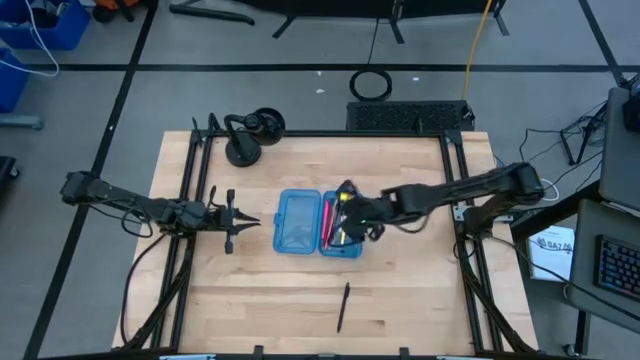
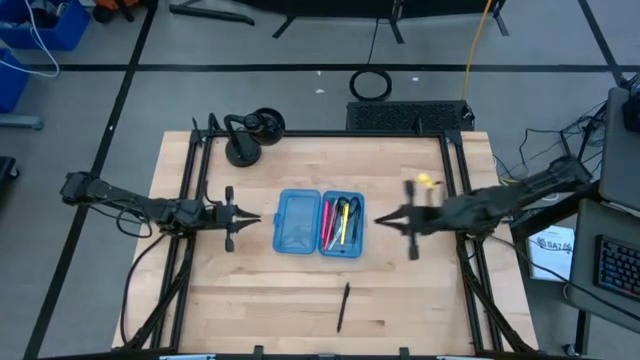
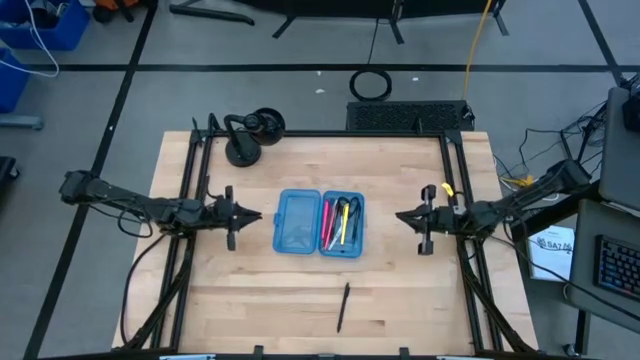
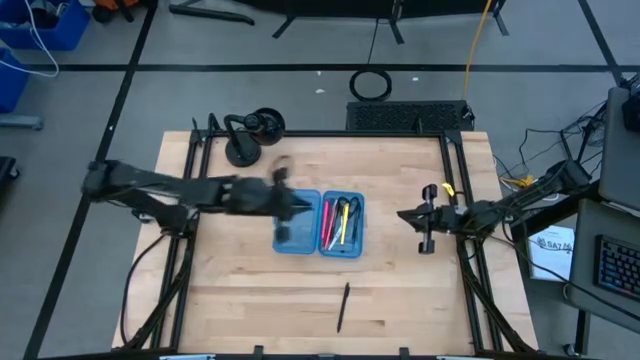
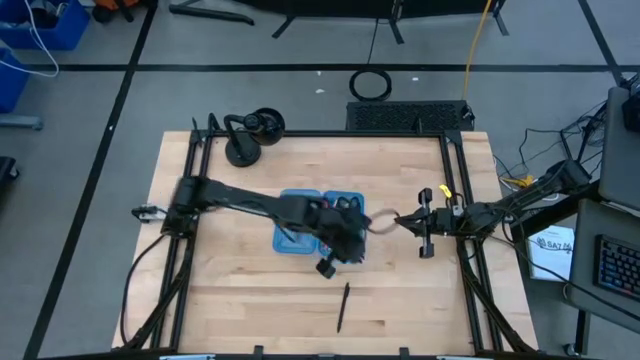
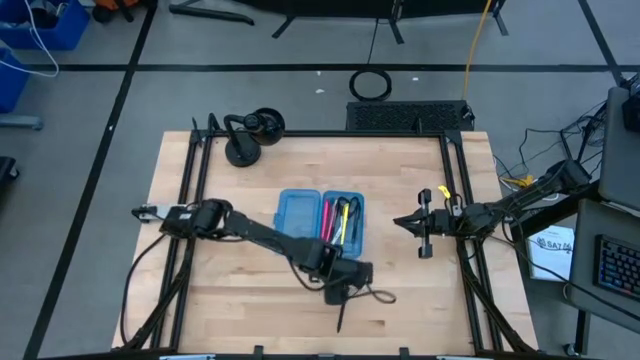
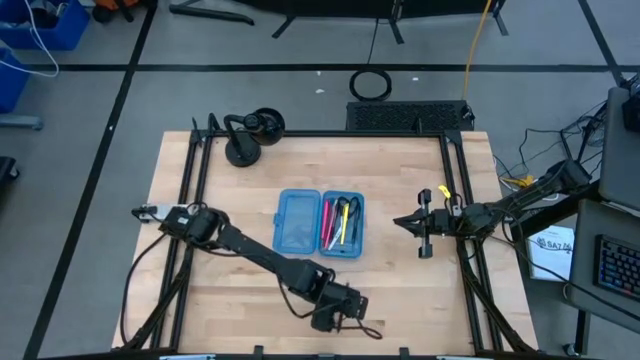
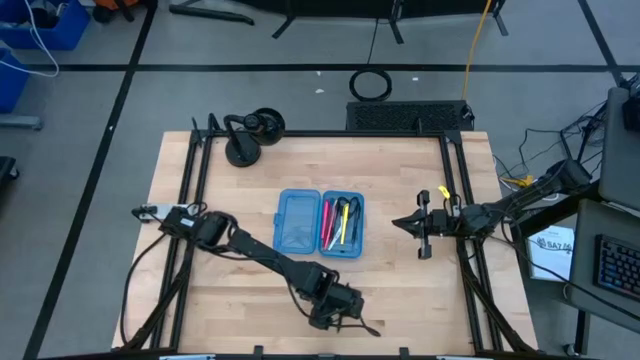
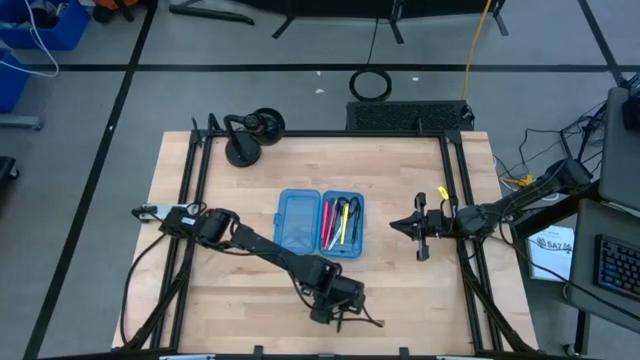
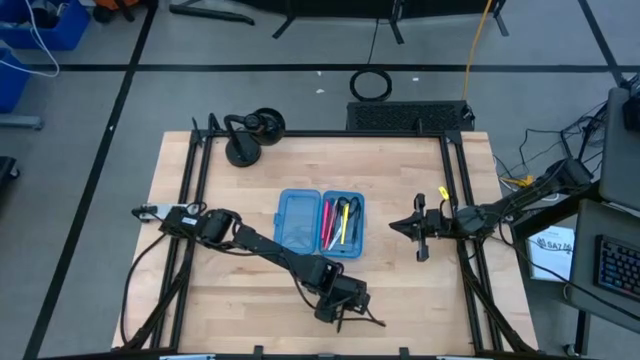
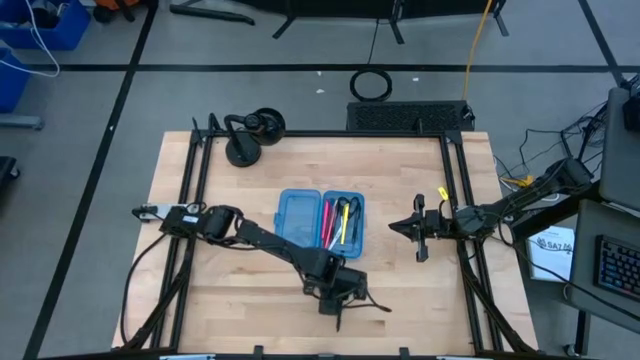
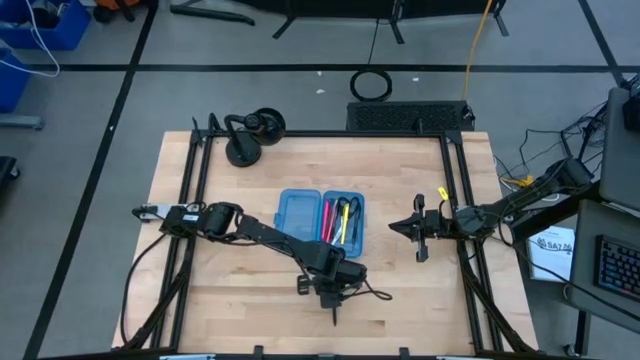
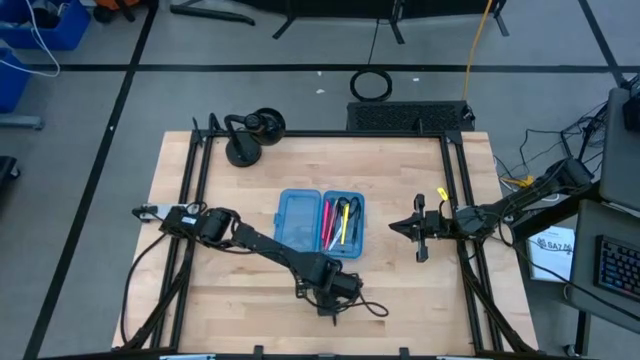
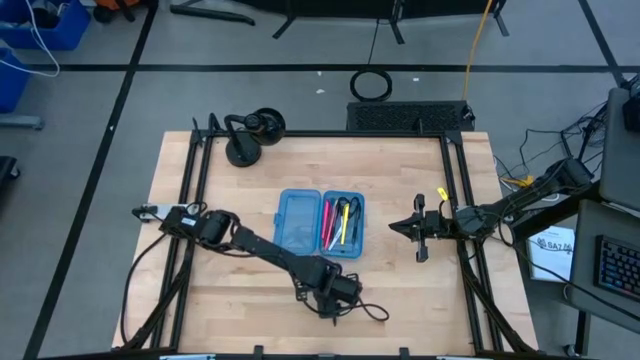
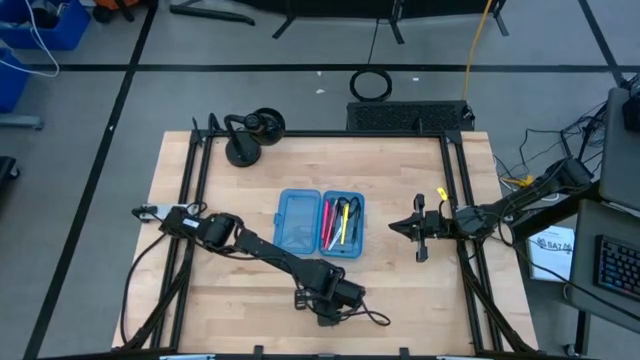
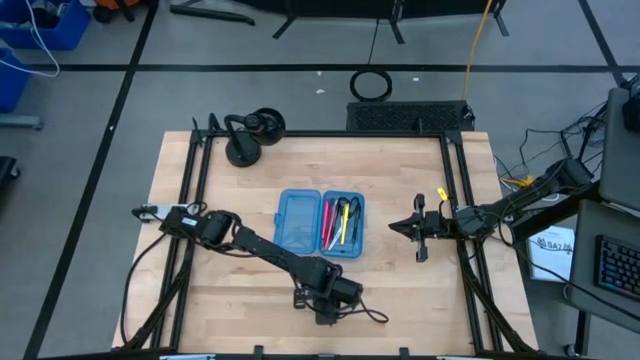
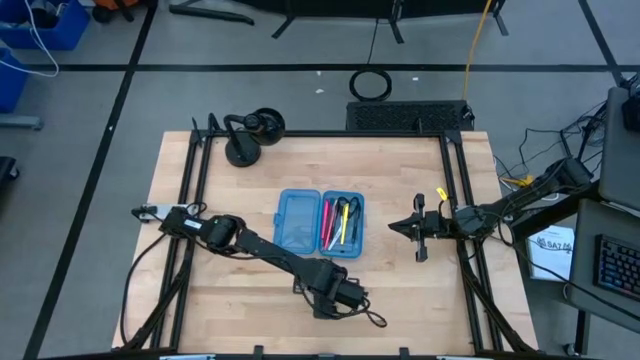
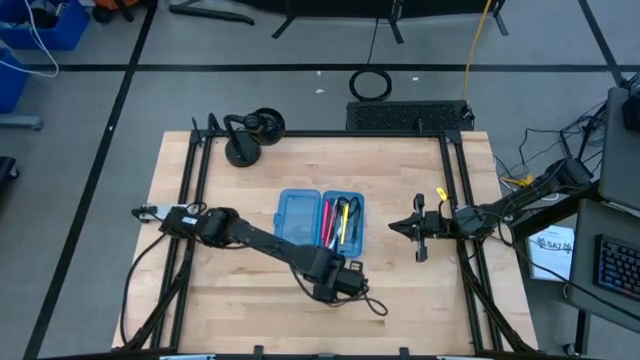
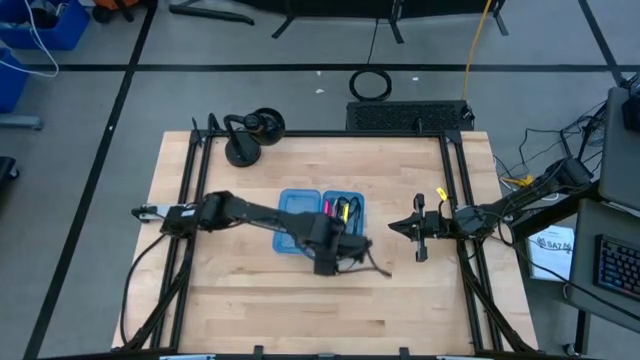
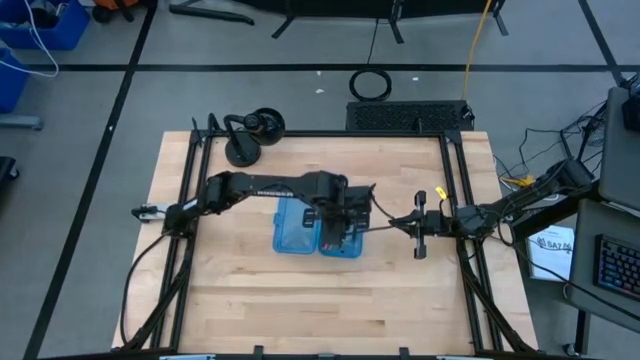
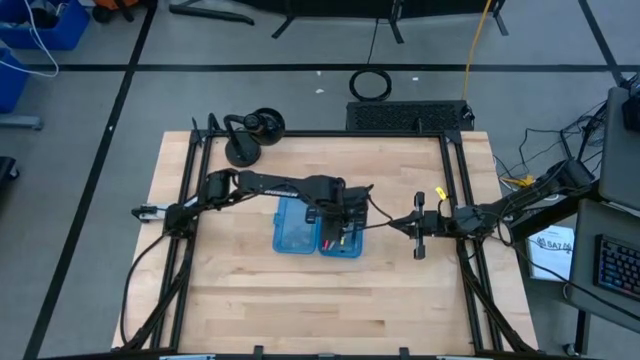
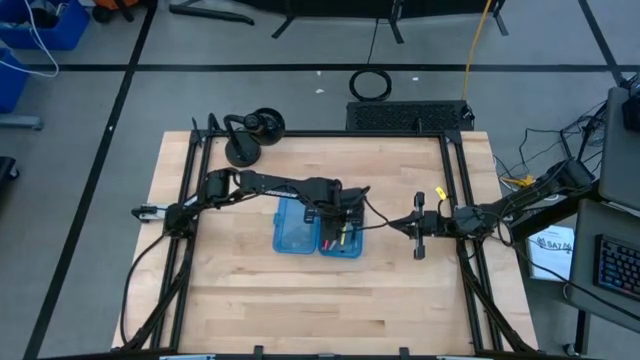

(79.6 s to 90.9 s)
Task: Pick & place school supplies into a supply box
Put the black pen into the blue supply box

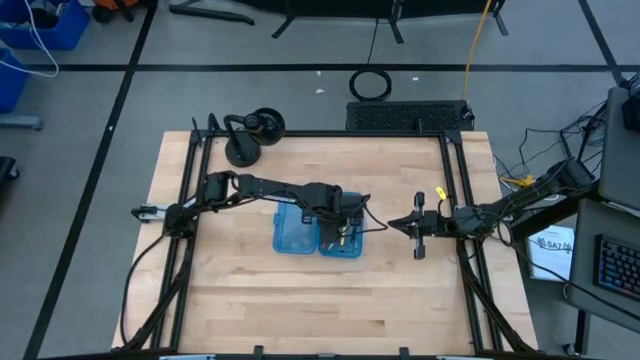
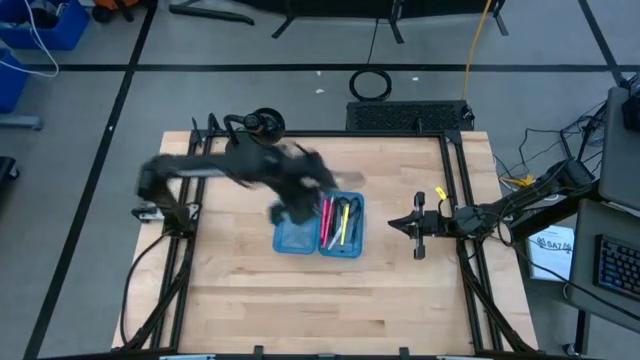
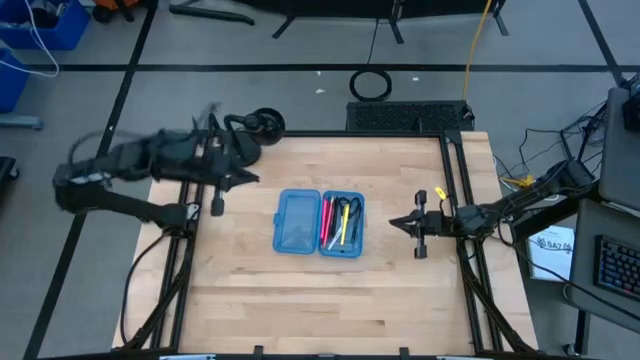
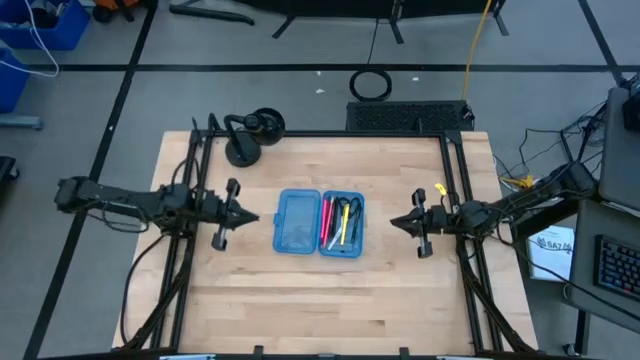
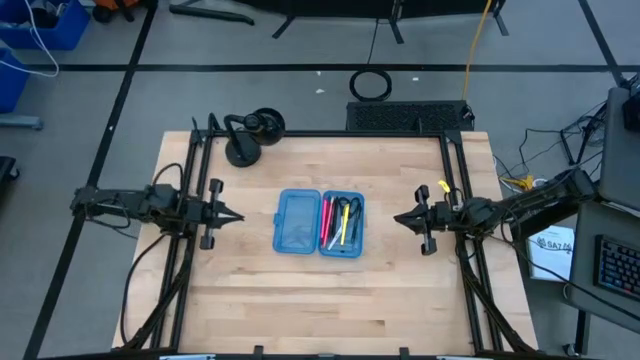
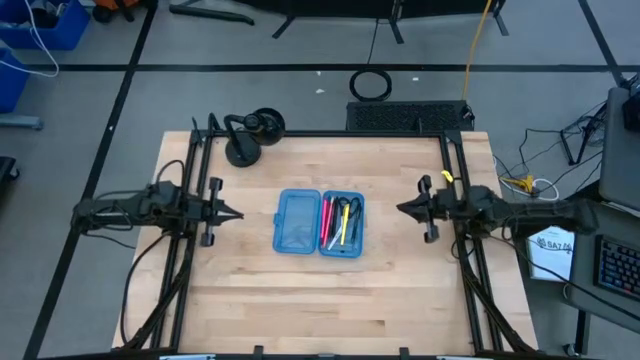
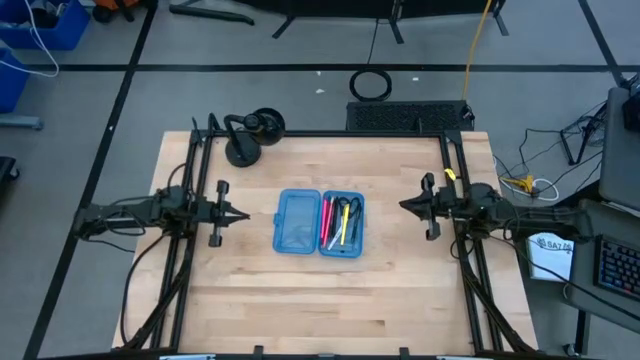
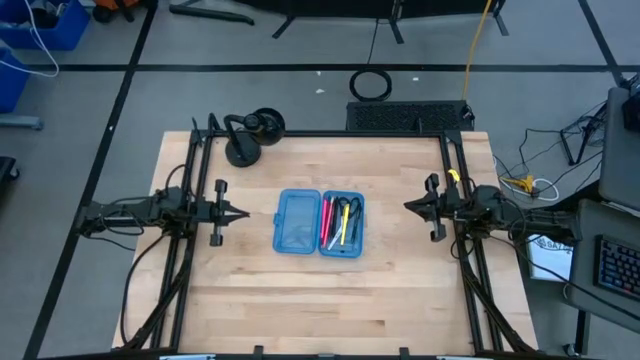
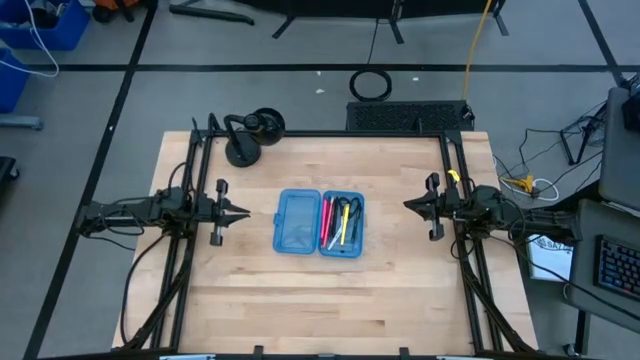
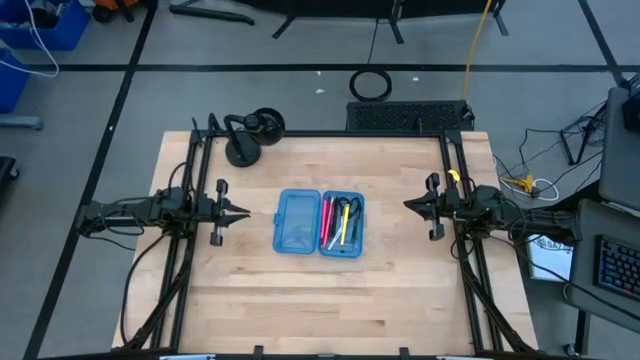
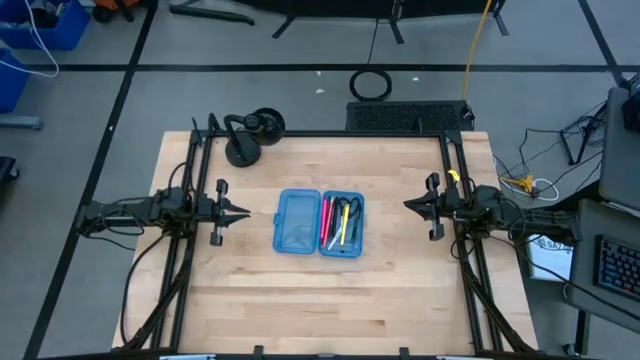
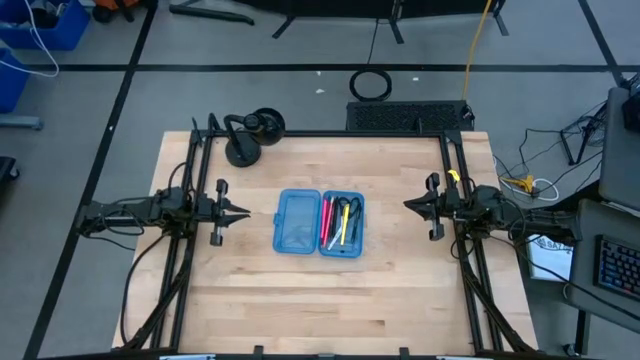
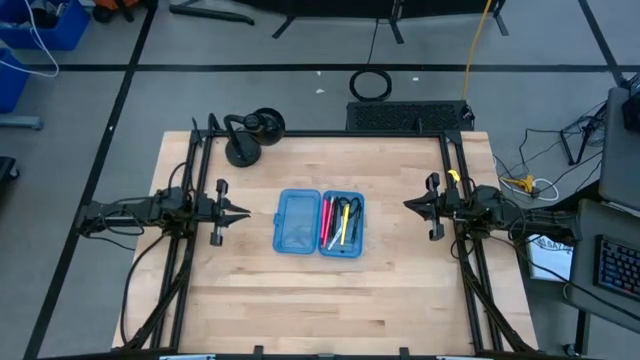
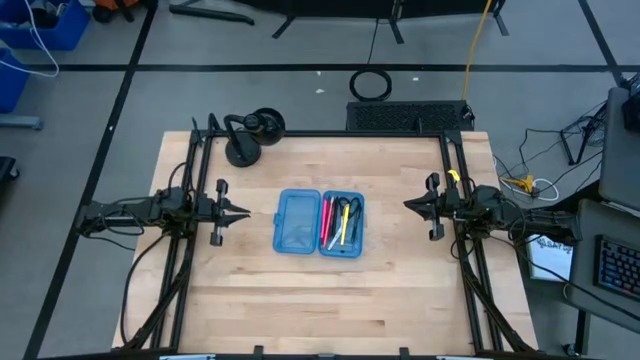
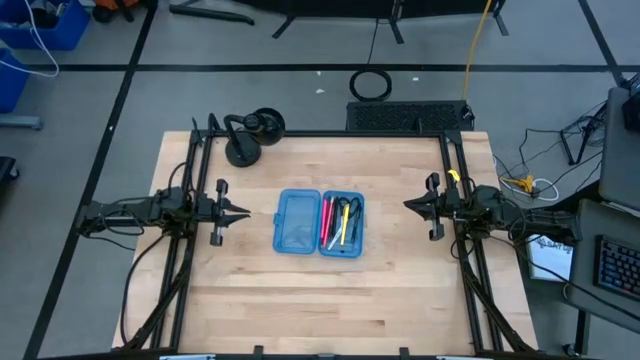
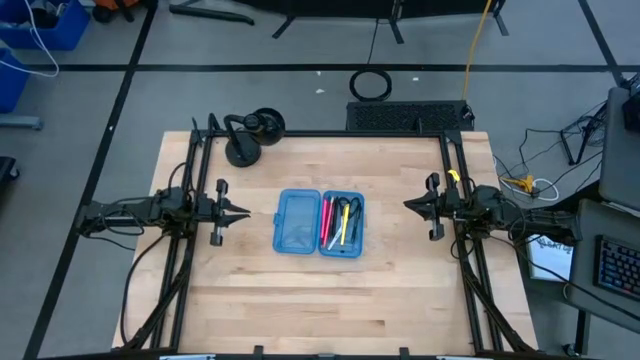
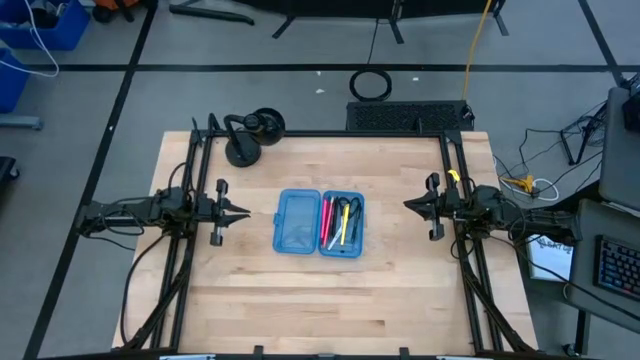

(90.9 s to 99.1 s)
Return to Home Position

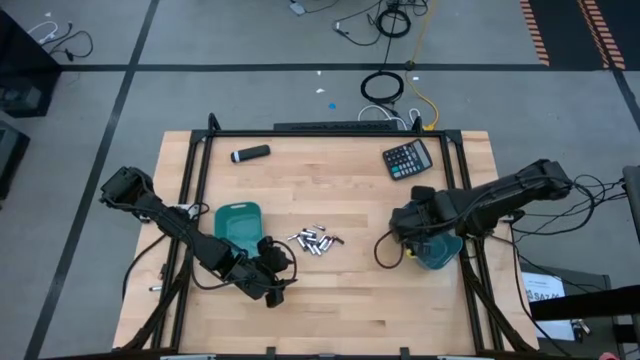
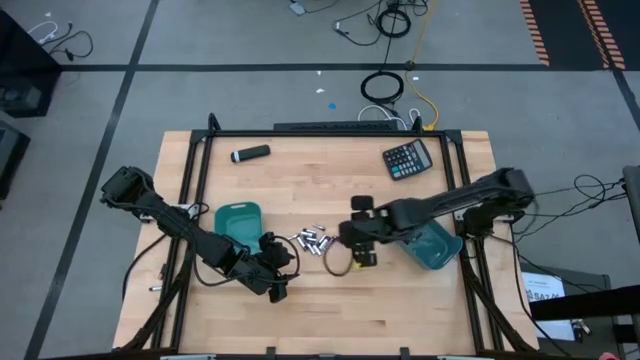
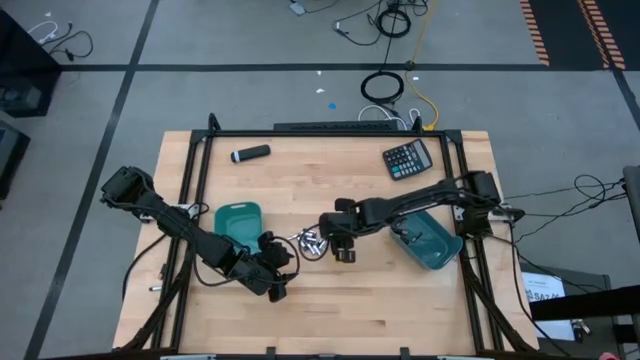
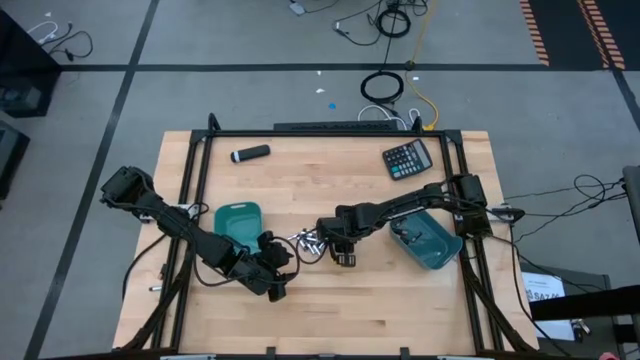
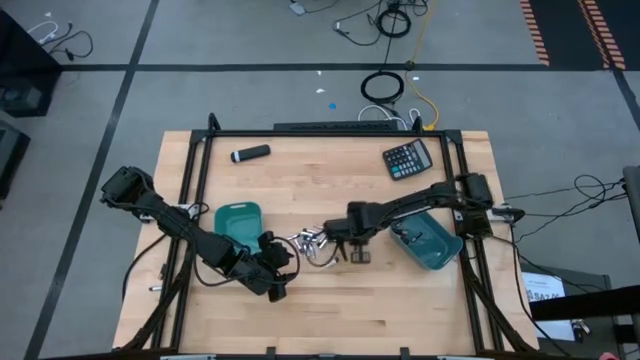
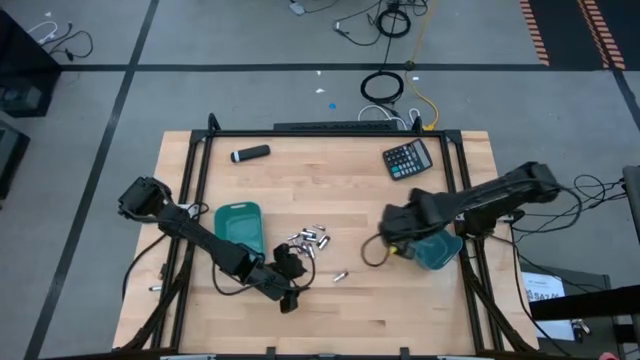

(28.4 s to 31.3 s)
Task: Sort batteries
Put the black battery into the blue bin
